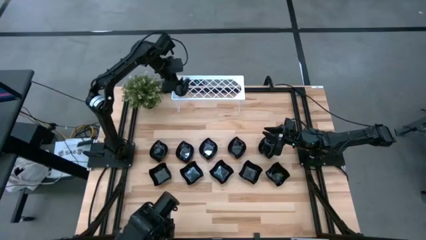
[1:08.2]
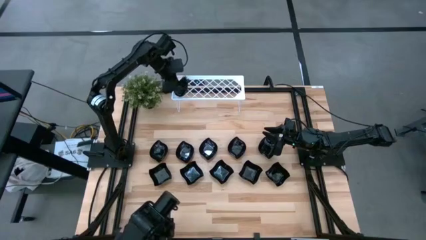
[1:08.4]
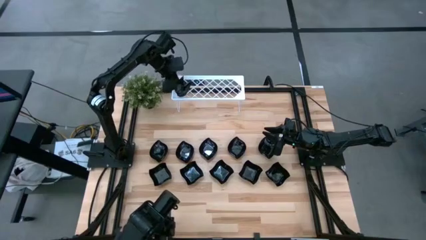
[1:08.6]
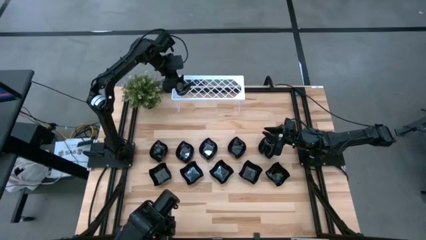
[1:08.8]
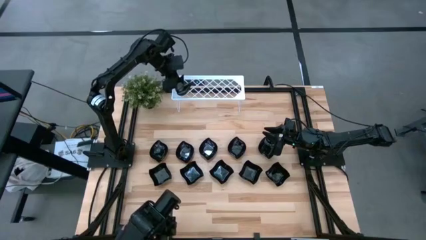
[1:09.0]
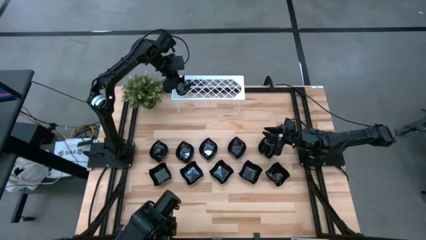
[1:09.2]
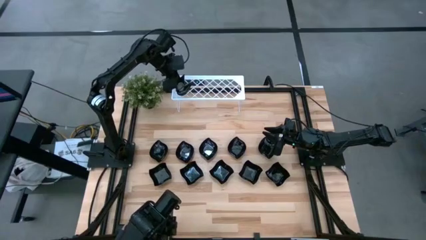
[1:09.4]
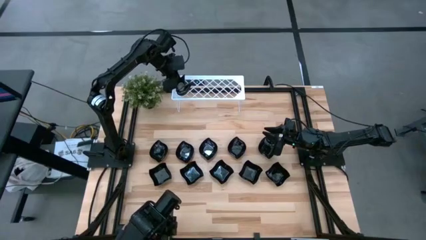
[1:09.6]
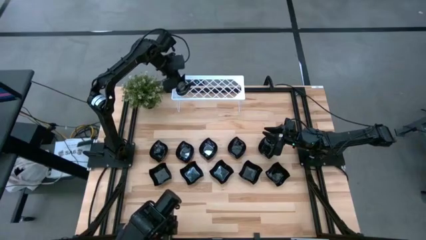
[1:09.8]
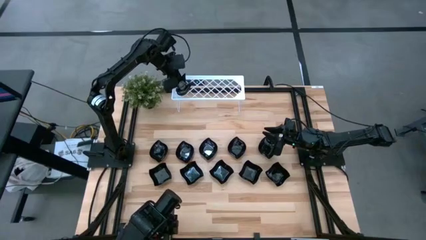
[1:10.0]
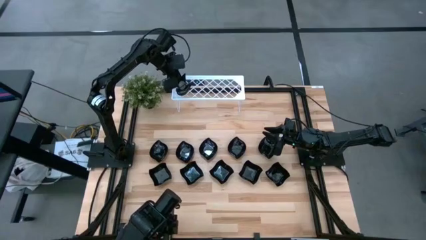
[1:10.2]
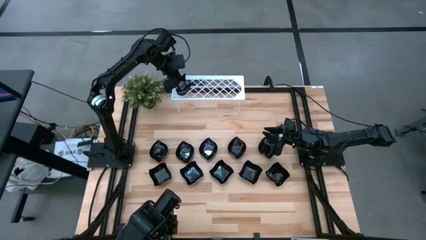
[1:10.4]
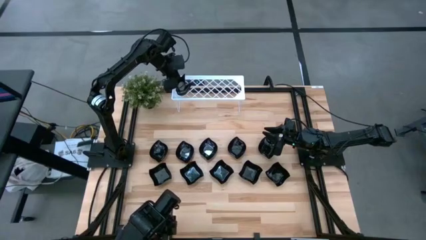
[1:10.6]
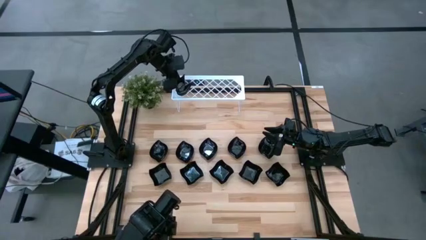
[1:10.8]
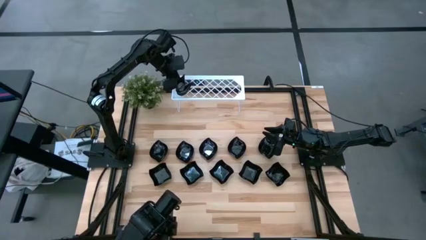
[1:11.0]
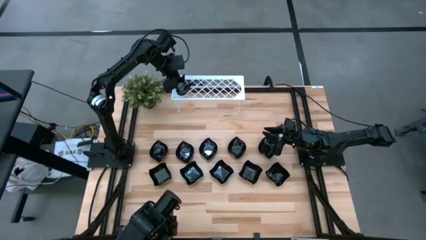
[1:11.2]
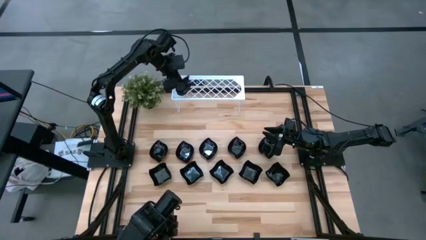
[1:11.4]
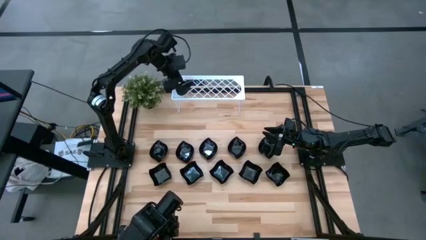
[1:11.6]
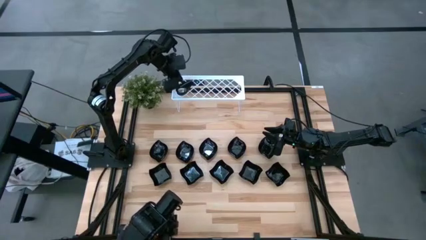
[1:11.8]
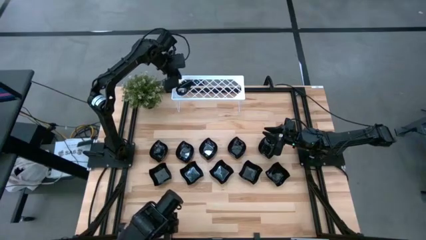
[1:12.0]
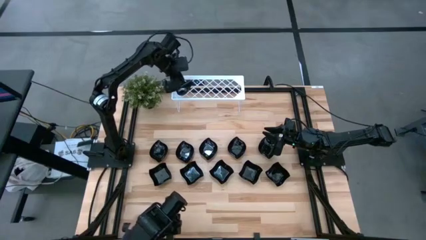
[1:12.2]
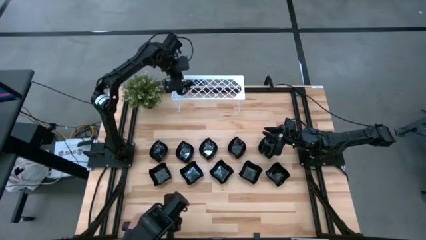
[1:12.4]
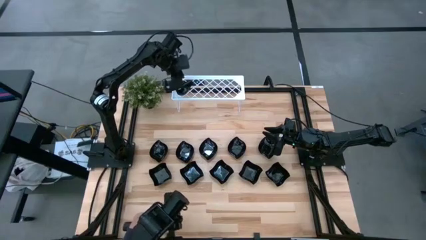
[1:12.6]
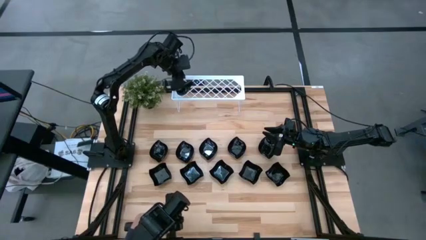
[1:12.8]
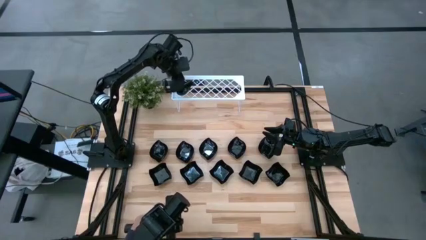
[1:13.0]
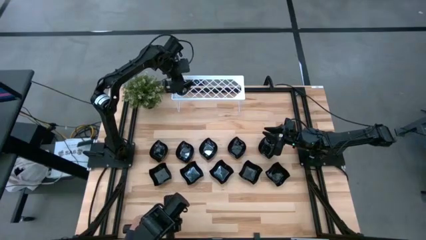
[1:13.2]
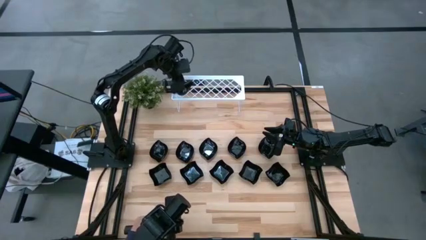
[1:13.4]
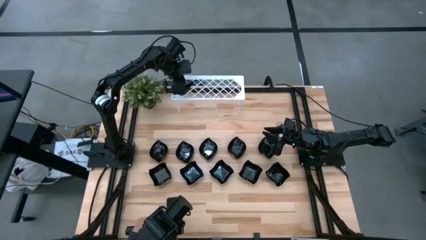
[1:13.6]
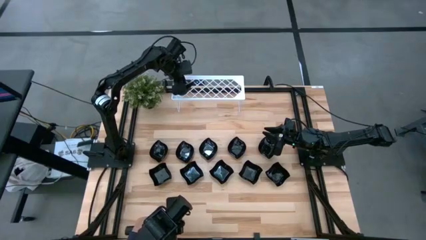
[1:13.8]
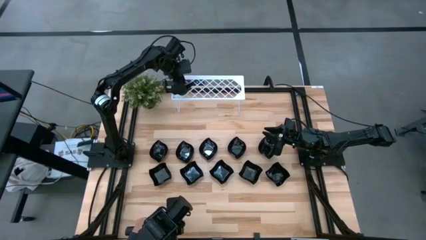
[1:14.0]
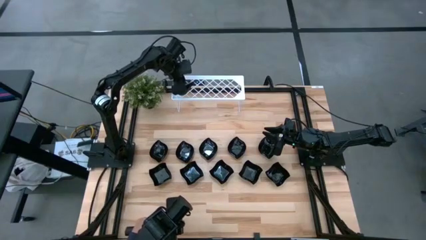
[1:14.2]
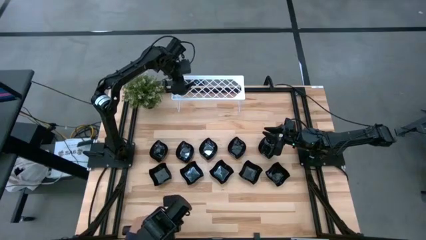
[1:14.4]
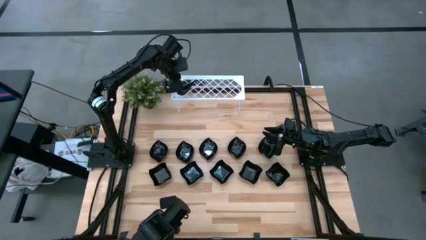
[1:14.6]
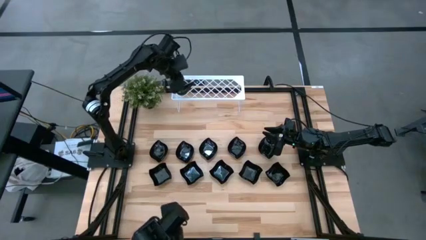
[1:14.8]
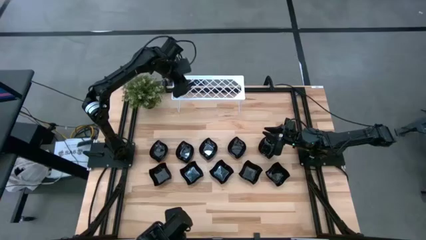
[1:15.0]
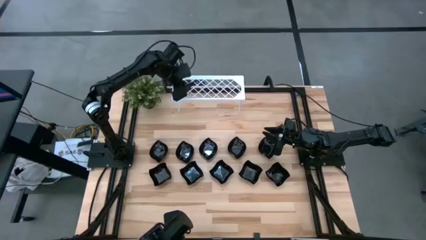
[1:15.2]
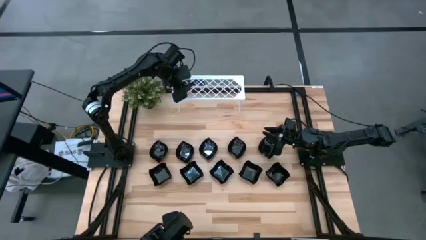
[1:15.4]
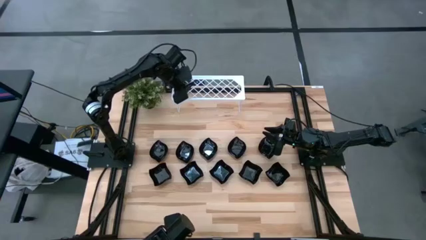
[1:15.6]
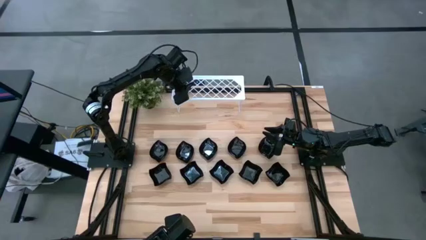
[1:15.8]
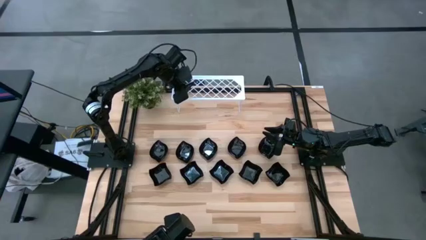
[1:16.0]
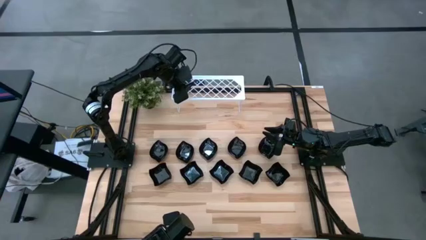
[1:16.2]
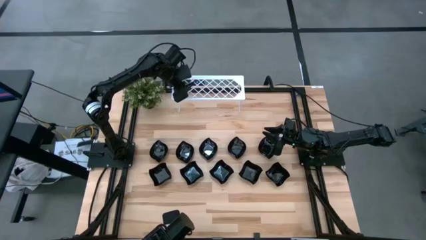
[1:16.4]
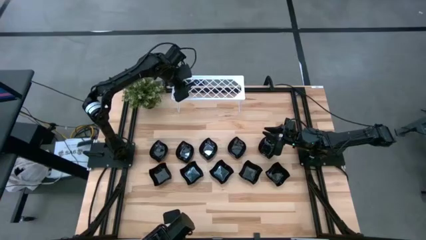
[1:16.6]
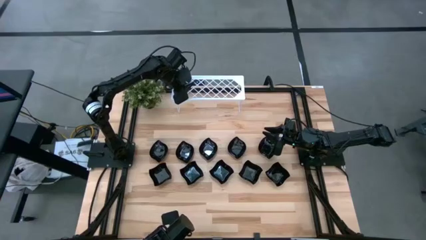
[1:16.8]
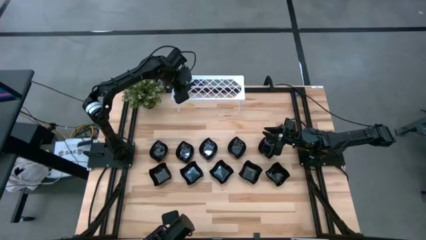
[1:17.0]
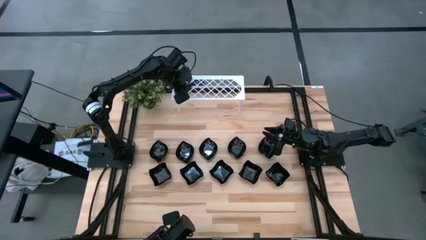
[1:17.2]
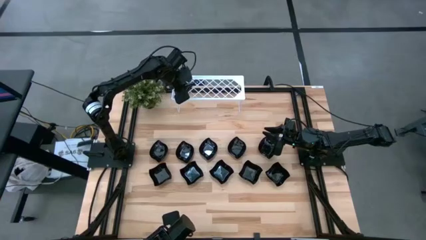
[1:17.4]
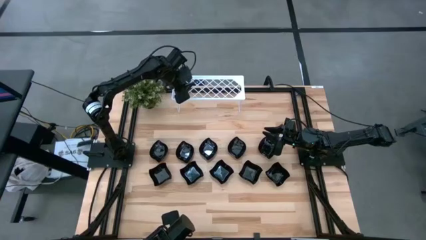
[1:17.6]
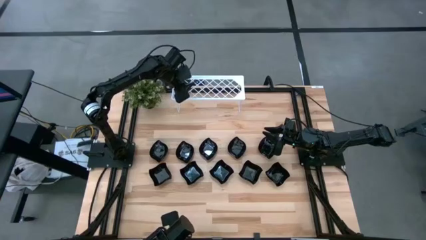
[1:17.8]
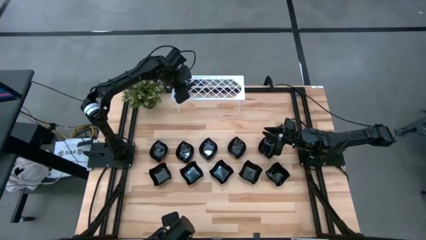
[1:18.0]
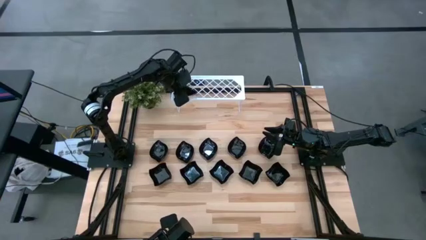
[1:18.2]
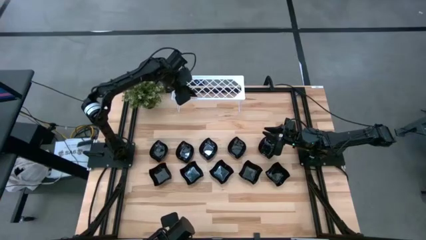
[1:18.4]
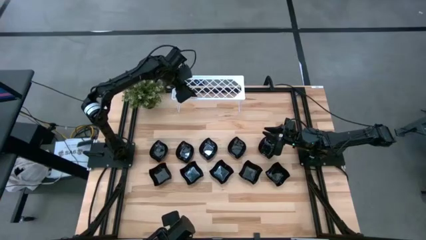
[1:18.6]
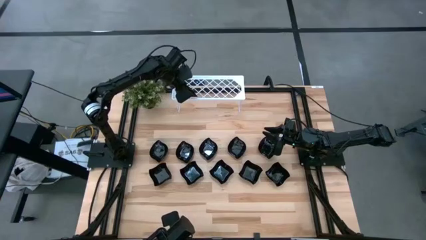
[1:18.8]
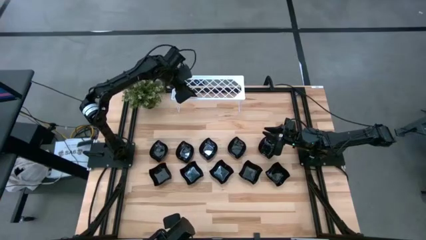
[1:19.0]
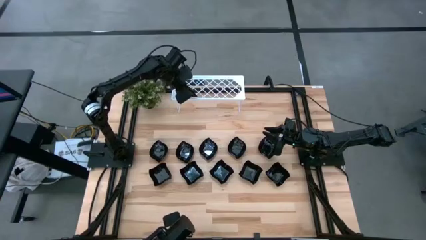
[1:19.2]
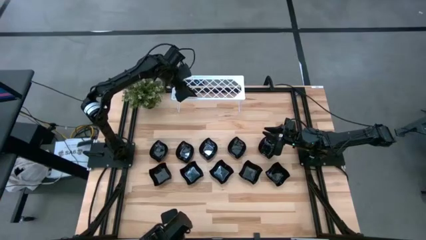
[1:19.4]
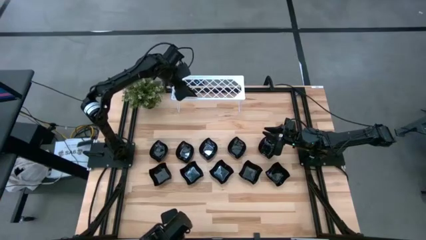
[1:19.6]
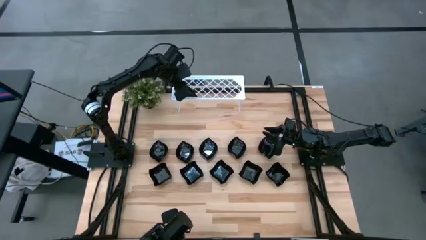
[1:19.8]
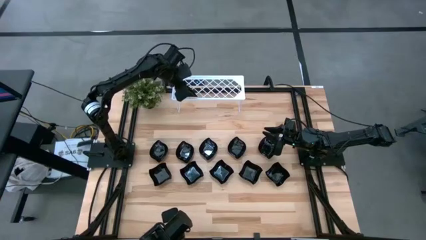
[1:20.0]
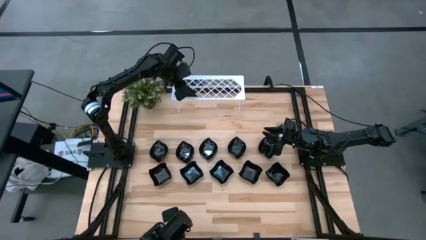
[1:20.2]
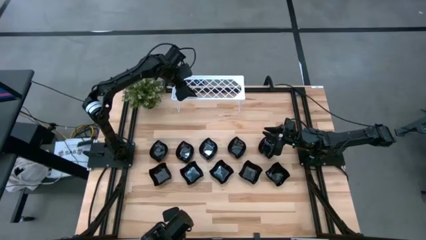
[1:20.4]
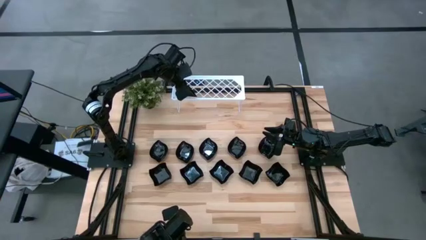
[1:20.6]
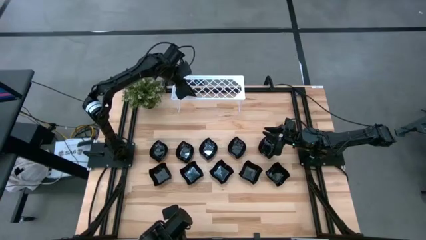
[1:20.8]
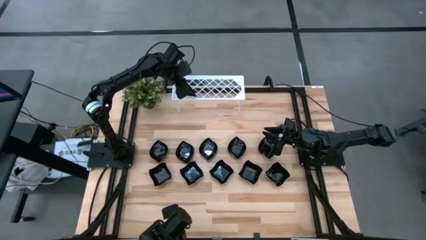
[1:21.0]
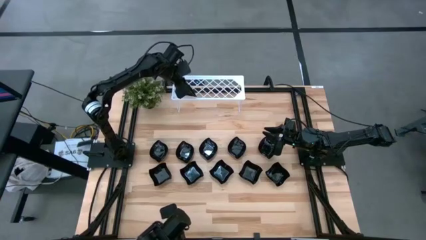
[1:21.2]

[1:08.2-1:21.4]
Task: Pick & Place Mini shaped plates
Stack the black drop shaped plate on top of the black drop shaped plate on the shelf
